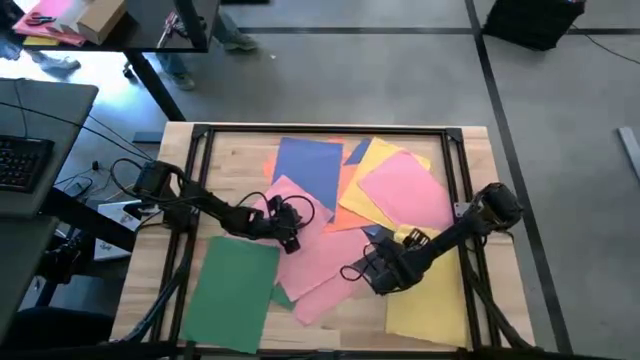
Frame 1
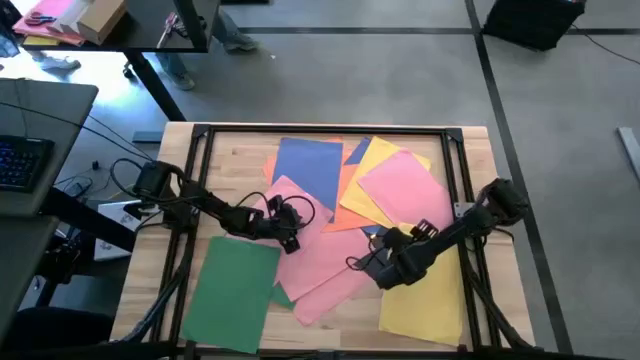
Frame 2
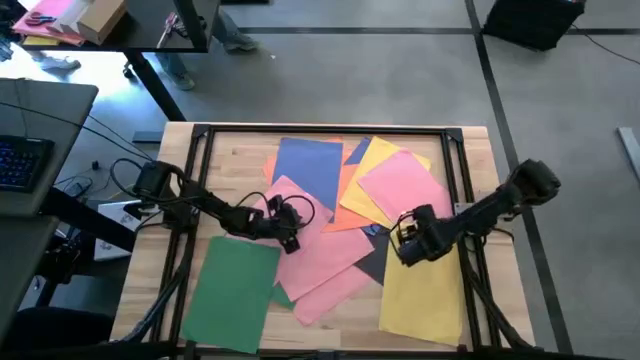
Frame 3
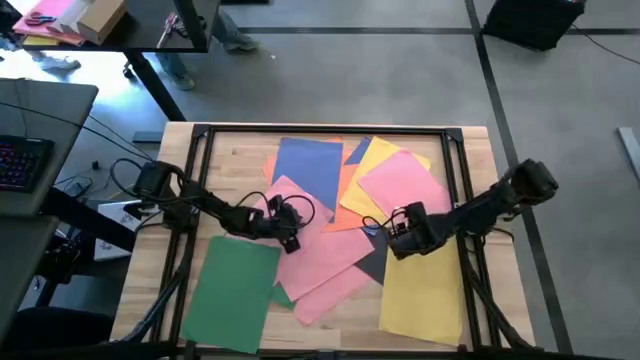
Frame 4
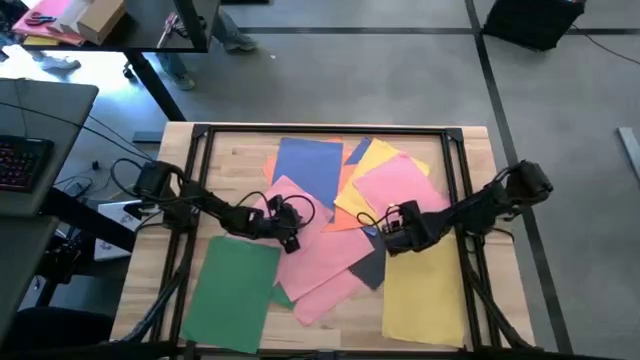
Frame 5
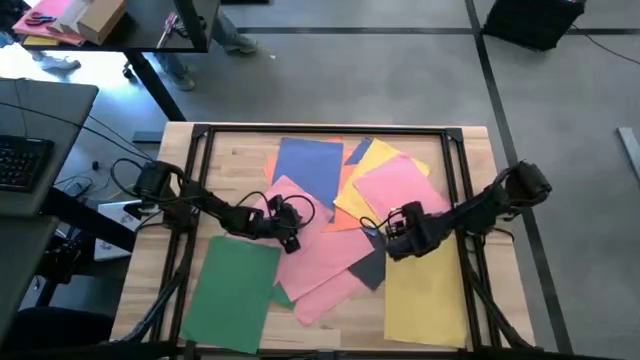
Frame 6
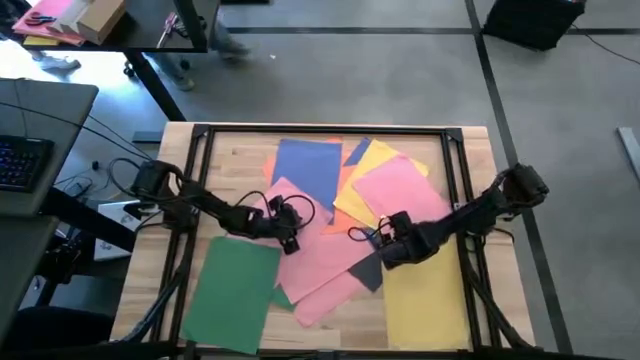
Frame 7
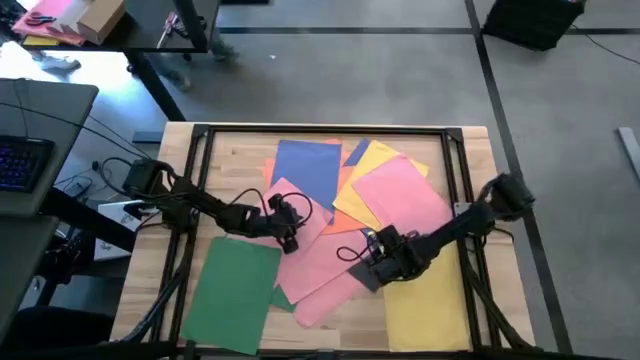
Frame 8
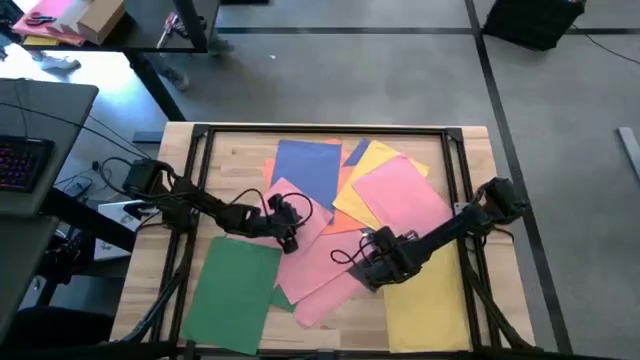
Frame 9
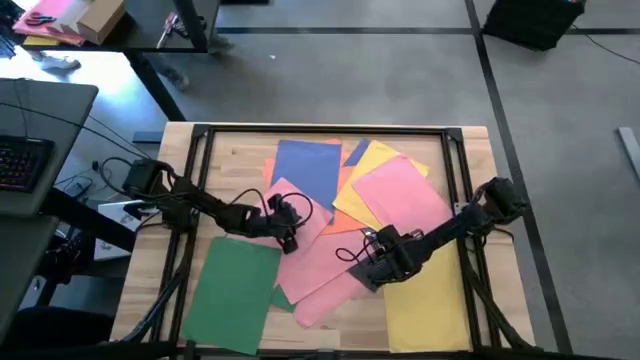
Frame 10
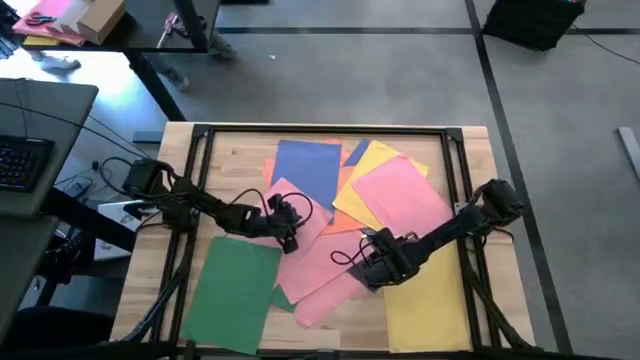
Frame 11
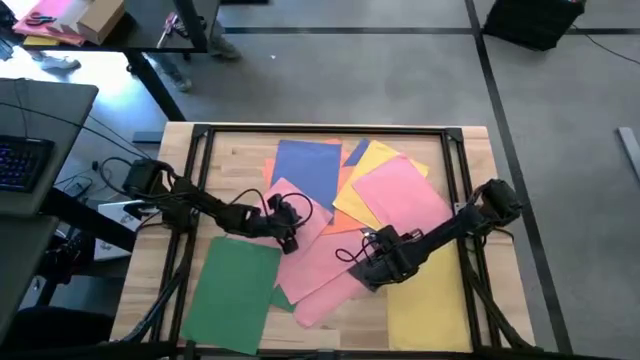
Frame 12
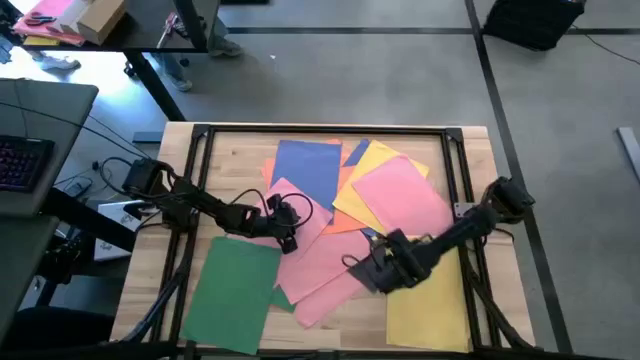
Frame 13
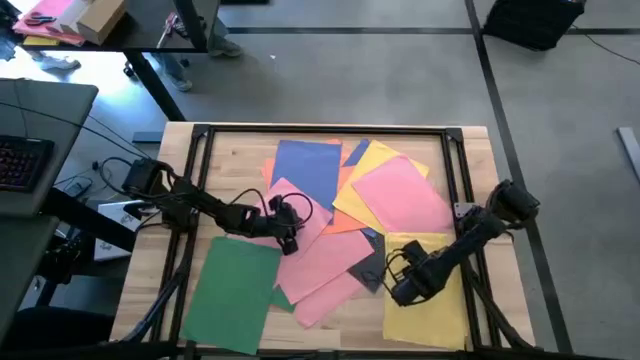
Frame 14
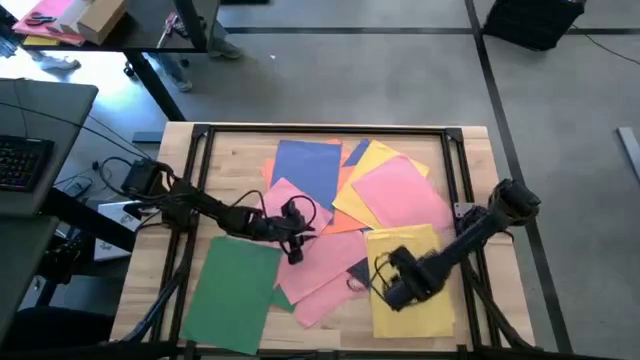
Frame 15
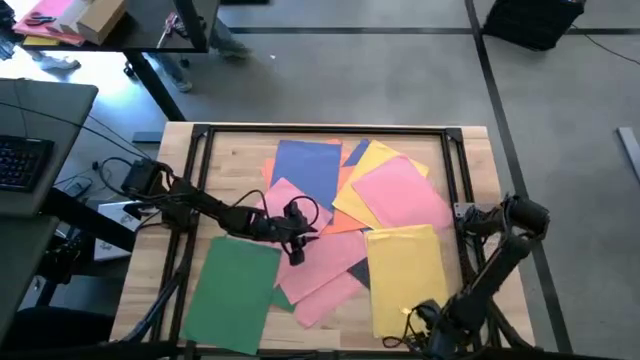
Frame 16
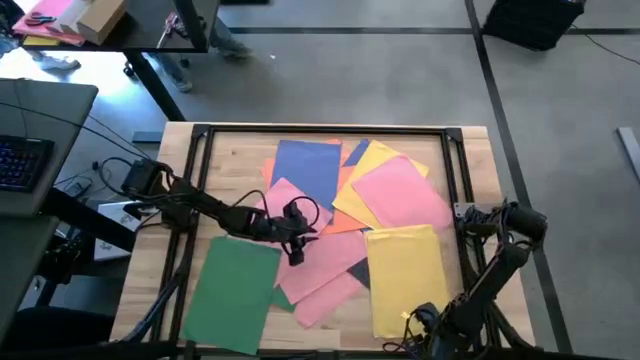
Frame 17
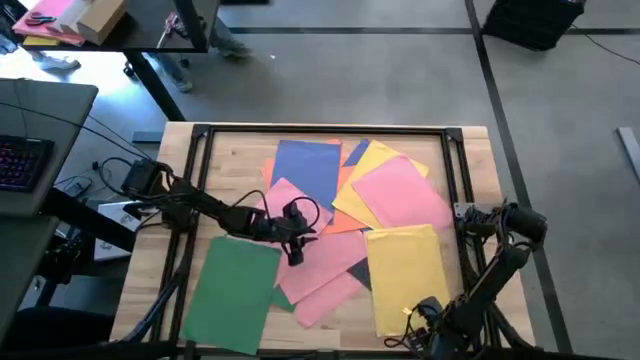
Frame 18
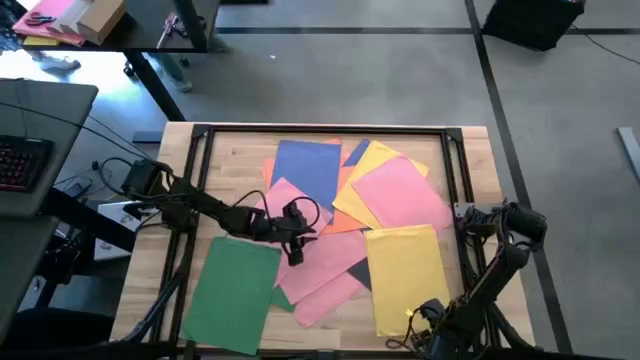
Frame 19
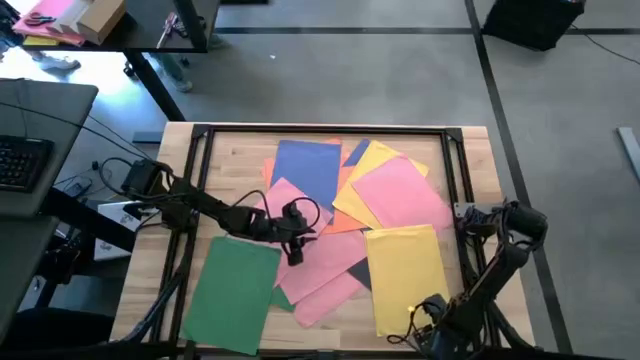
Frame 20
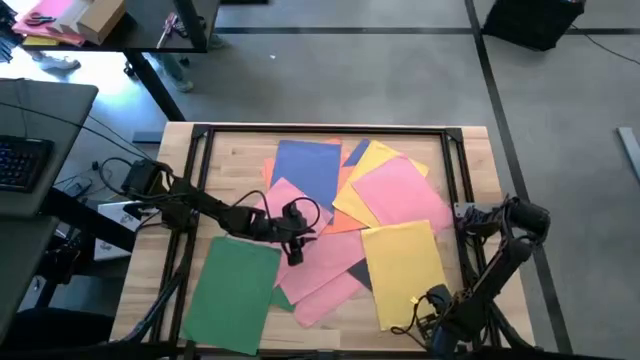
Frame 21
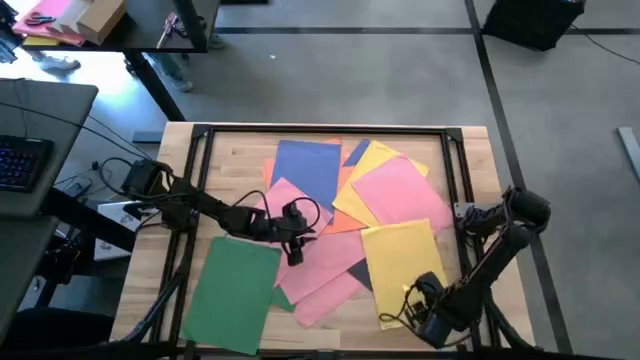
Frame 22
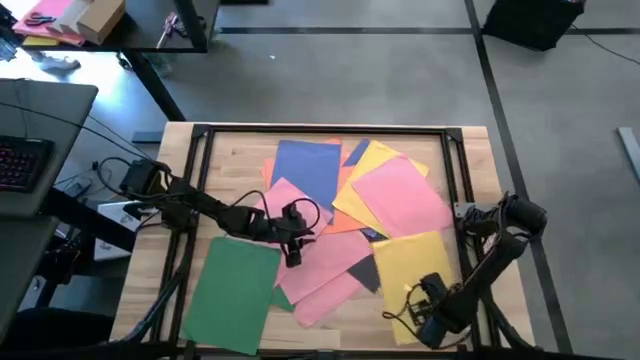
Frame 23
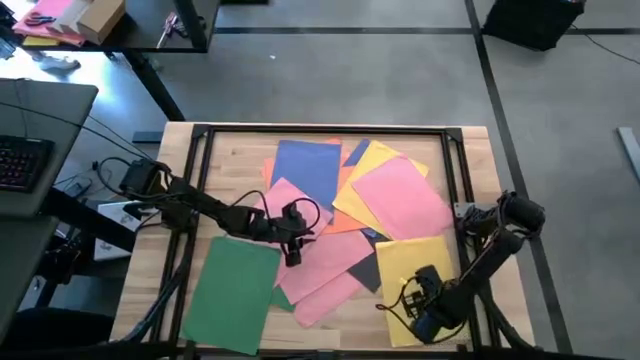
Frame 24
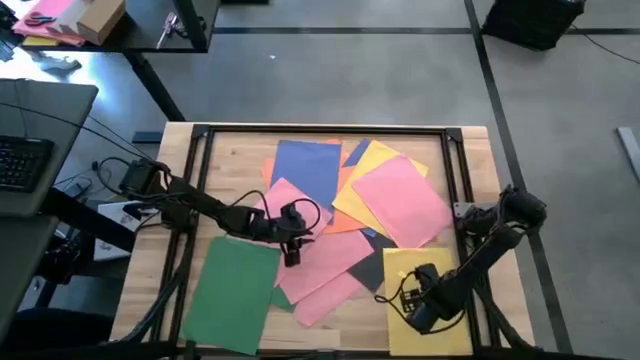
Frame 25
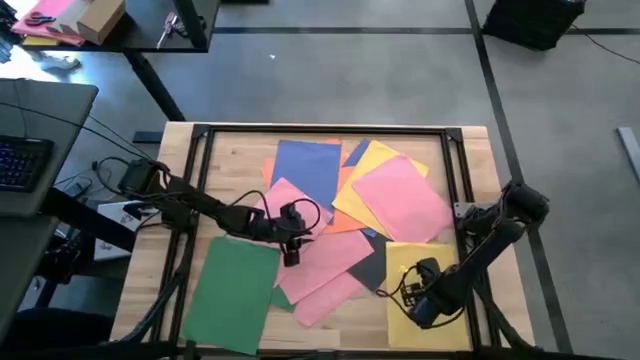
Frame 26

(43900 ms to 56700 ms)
Task: Organize paper
Stack the yellow paper on top of the other yellow paper to the bottom right of the table

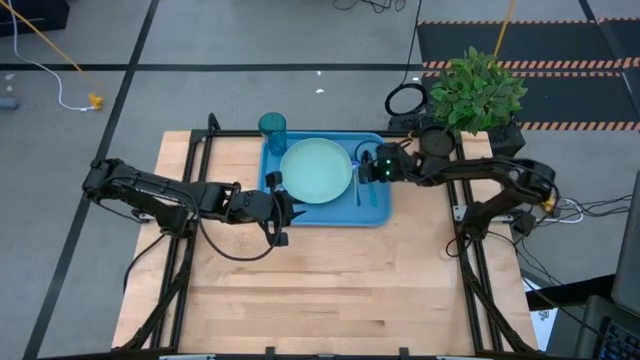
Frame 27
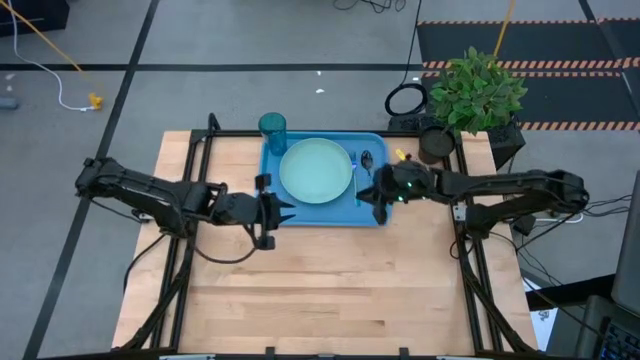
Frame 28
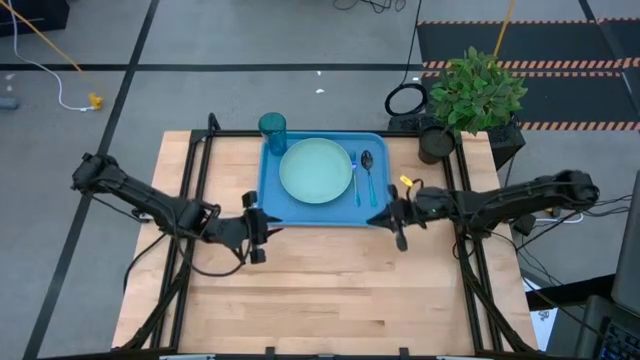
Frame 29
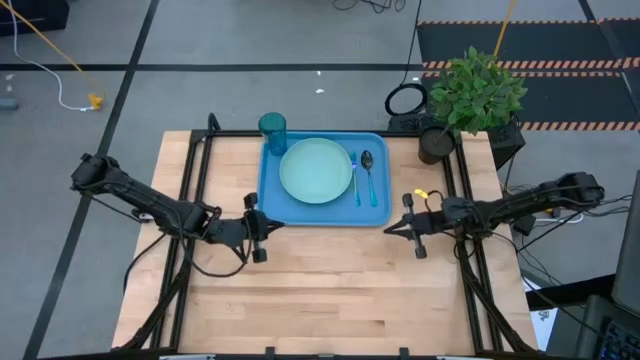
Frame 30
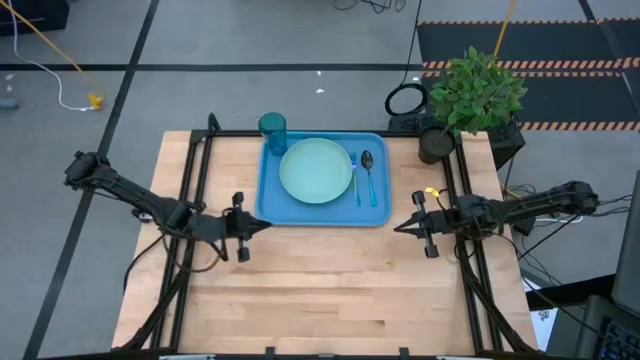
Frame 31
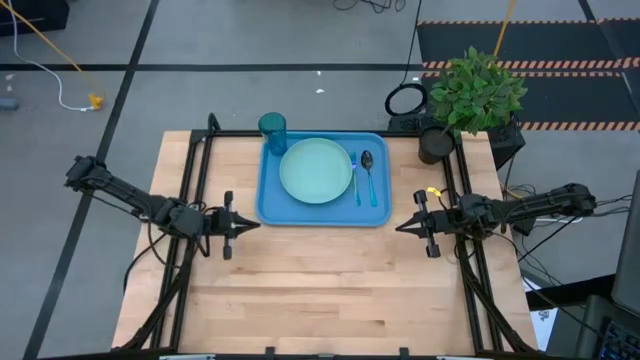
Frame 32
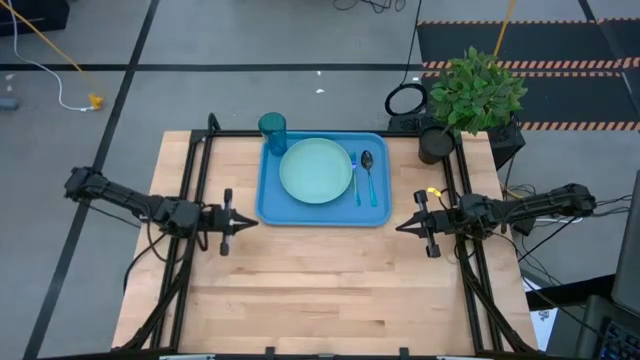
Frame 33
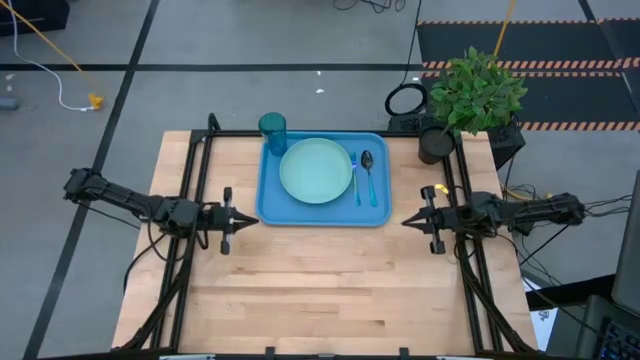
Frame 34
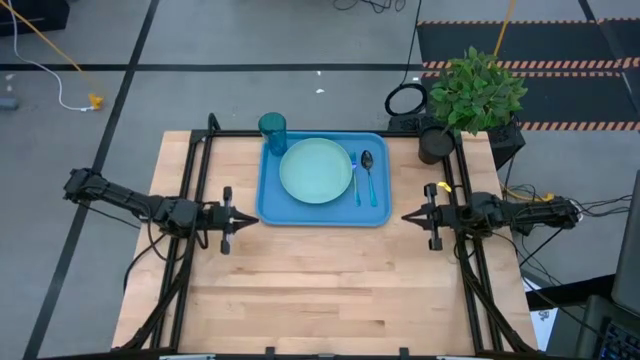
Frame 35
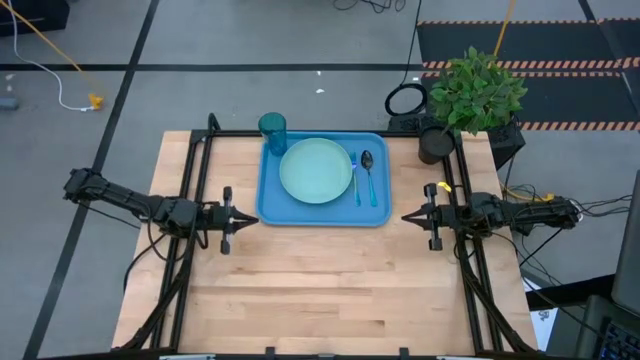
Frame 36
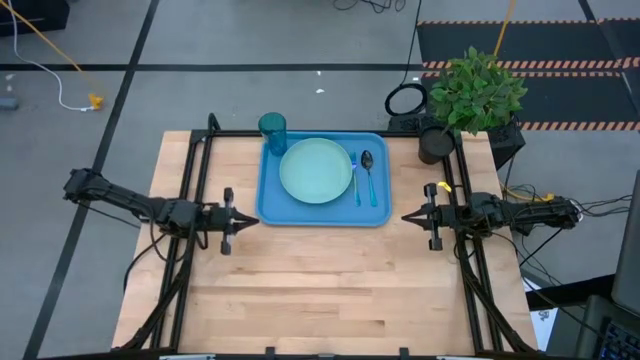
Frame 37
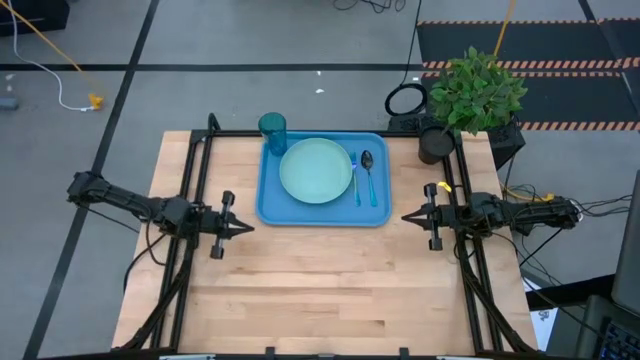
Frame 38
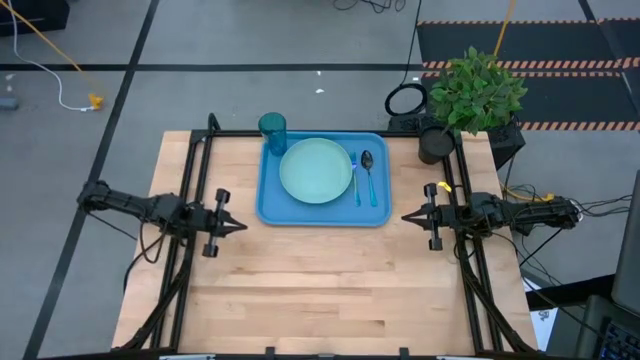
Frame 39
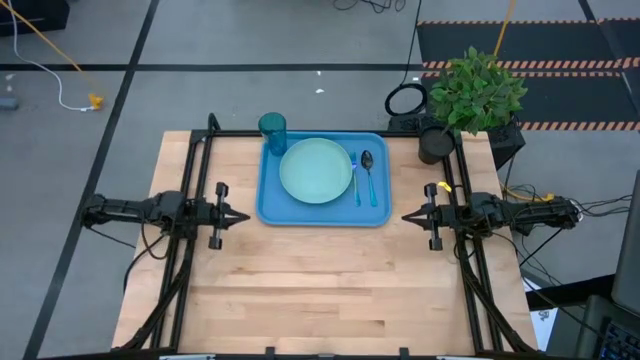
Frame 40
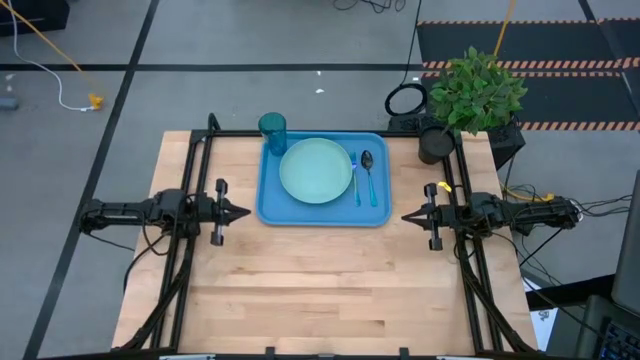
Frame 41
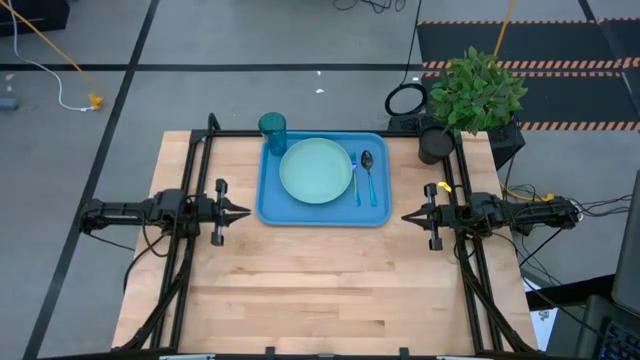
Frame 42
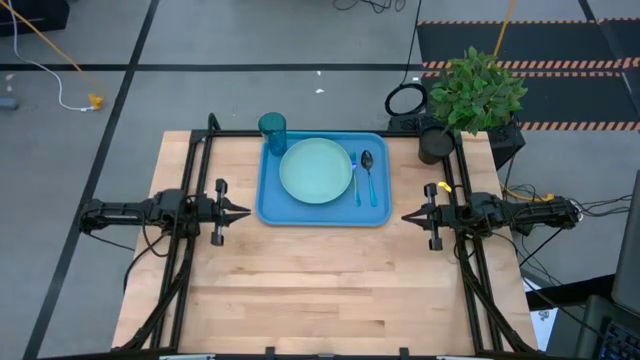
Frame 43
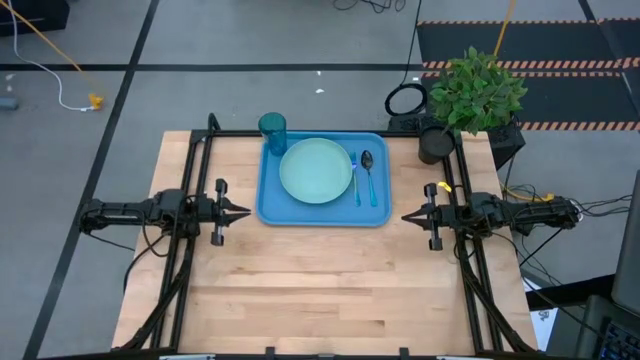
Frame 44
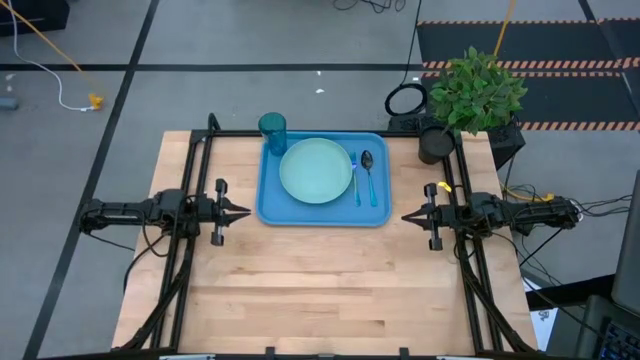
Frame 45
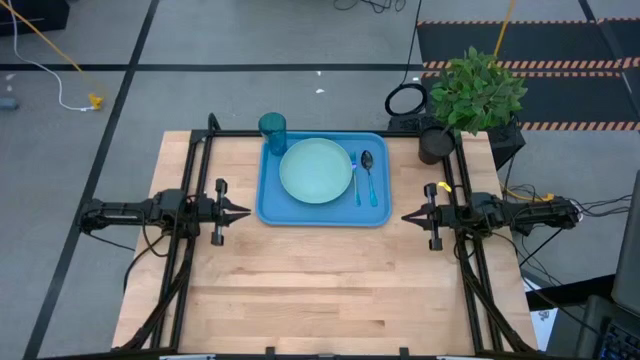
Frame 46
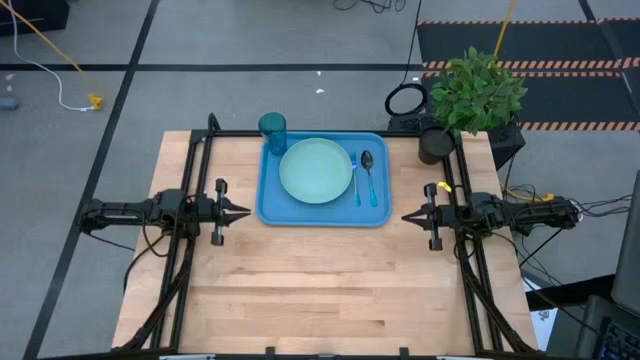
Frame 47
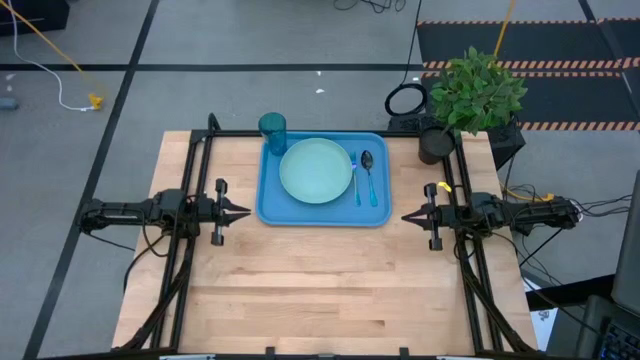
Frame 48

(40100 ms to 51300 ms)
Task: Pick and place plate/cup/fork/spoon on tray
Return to Home Position
